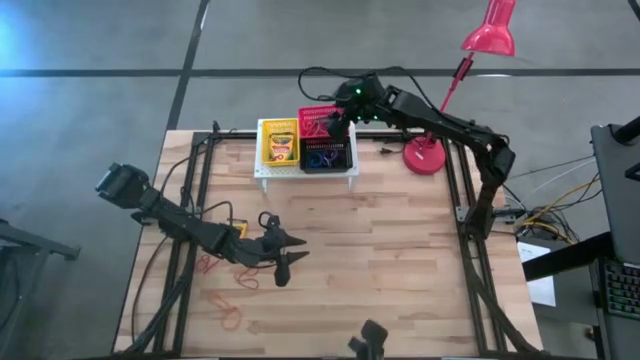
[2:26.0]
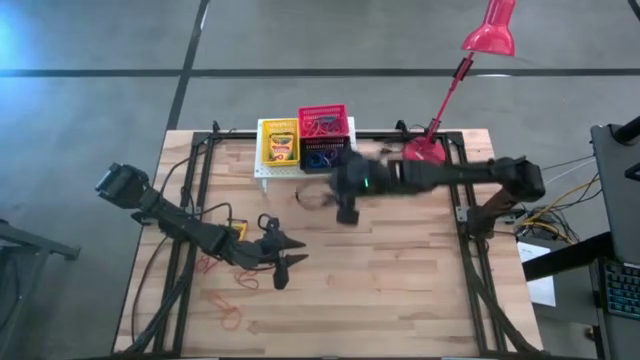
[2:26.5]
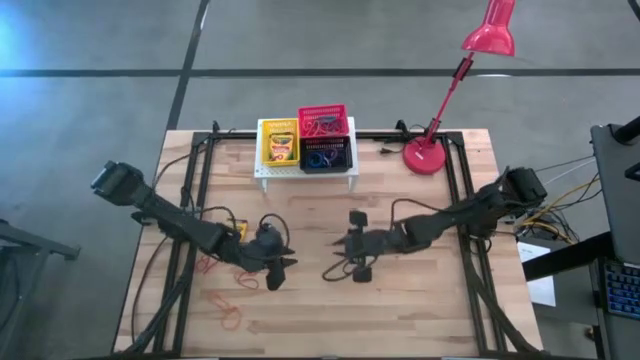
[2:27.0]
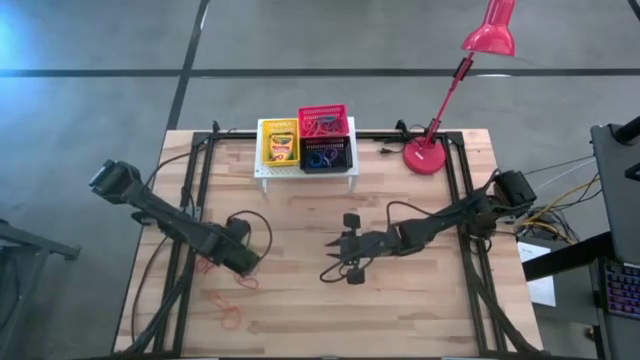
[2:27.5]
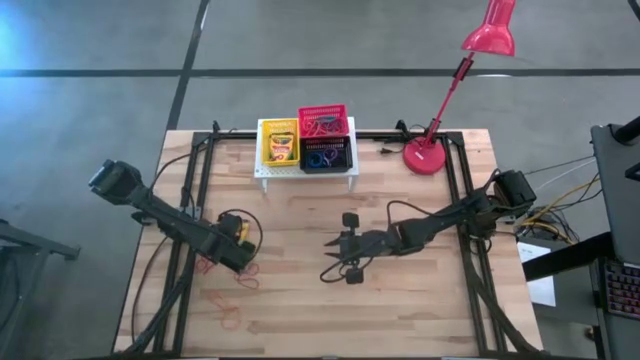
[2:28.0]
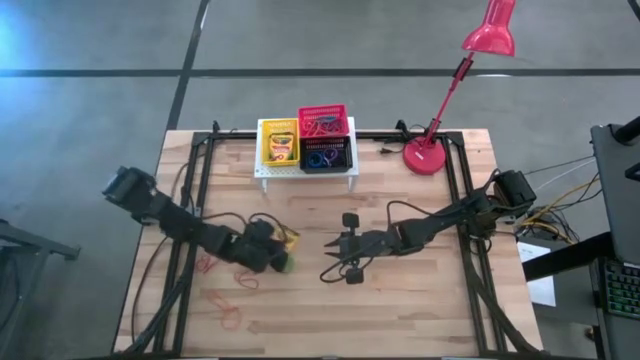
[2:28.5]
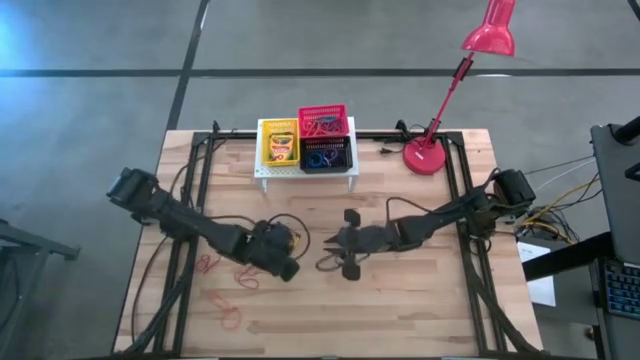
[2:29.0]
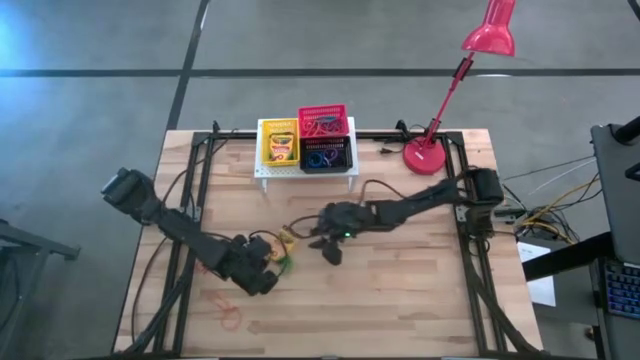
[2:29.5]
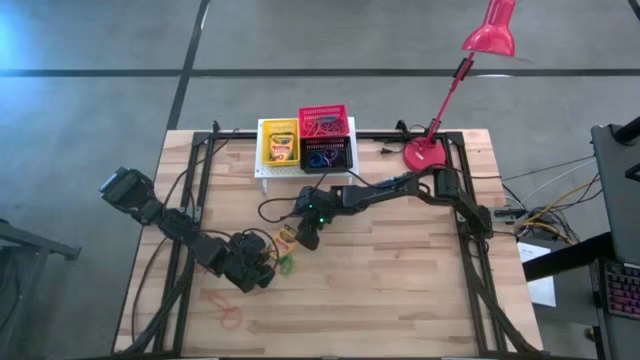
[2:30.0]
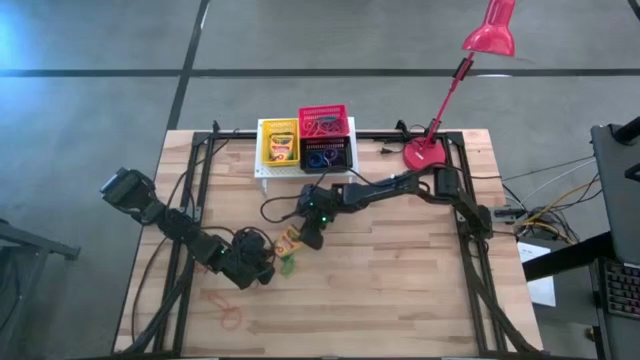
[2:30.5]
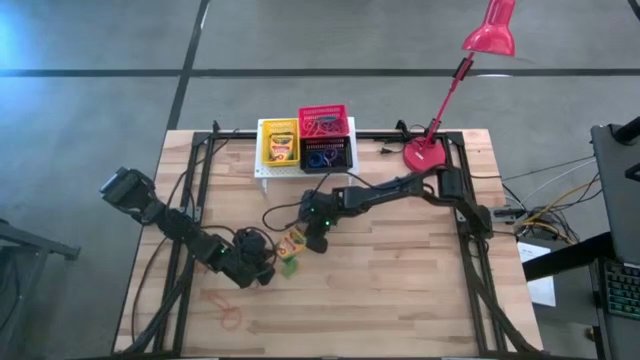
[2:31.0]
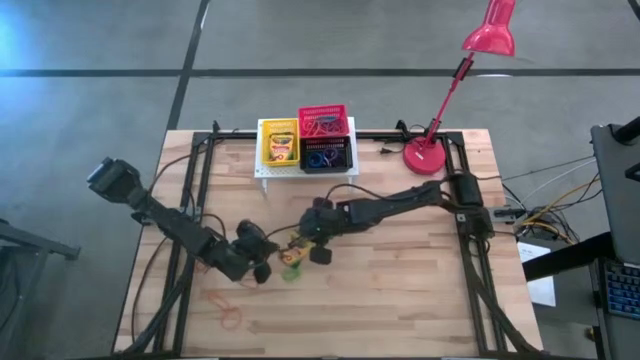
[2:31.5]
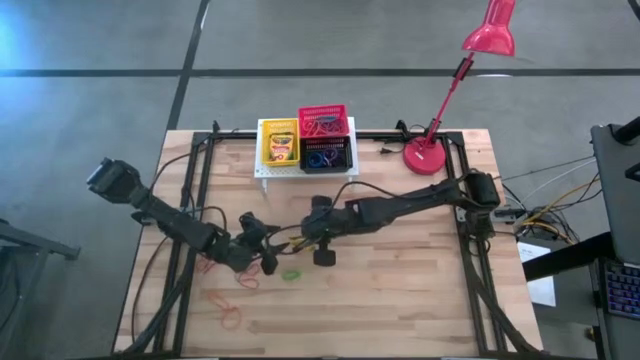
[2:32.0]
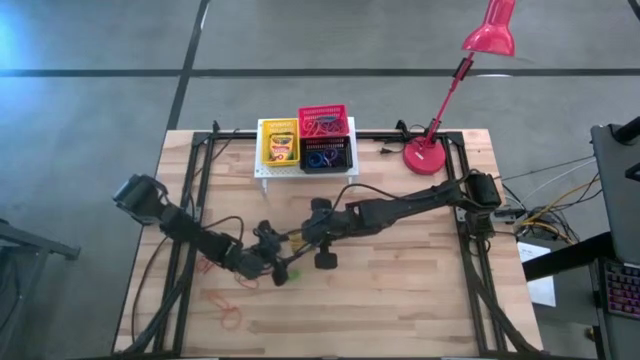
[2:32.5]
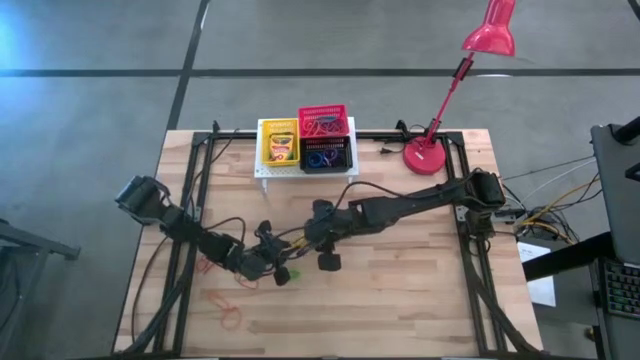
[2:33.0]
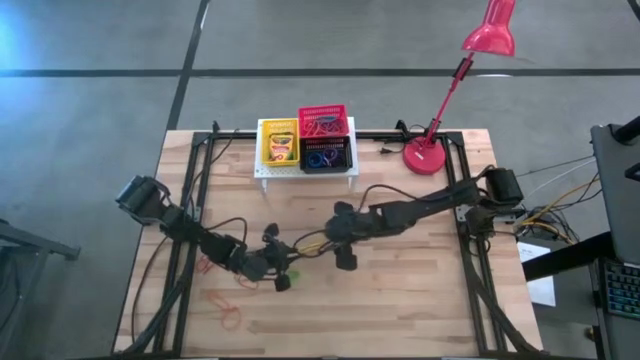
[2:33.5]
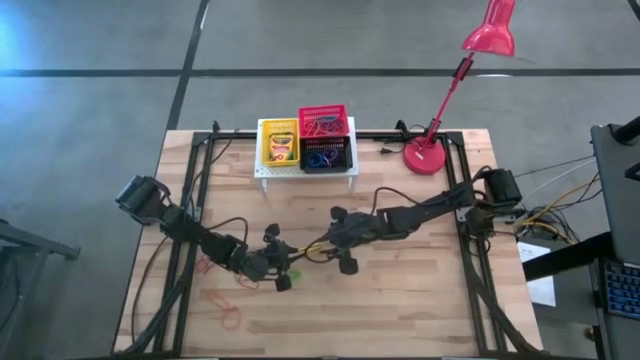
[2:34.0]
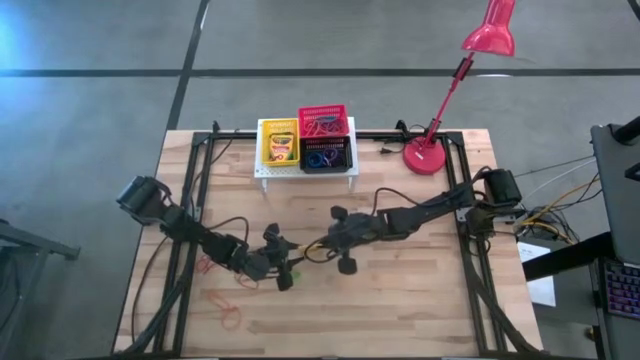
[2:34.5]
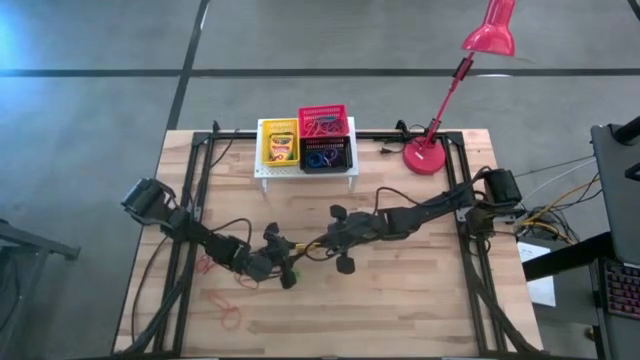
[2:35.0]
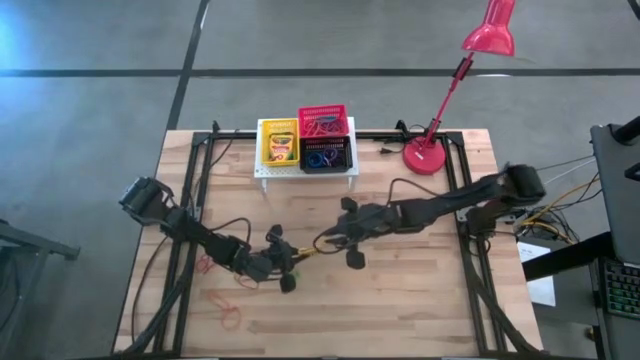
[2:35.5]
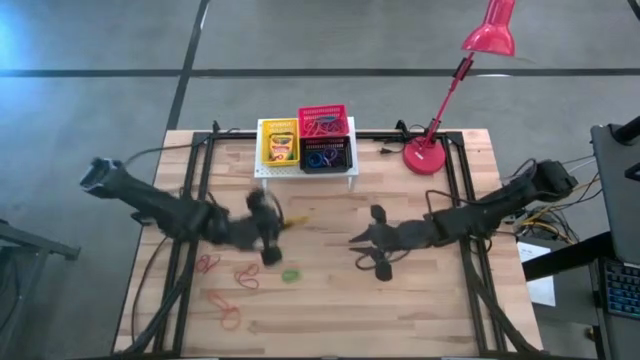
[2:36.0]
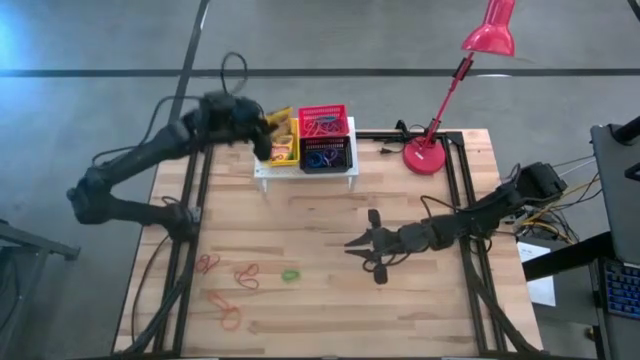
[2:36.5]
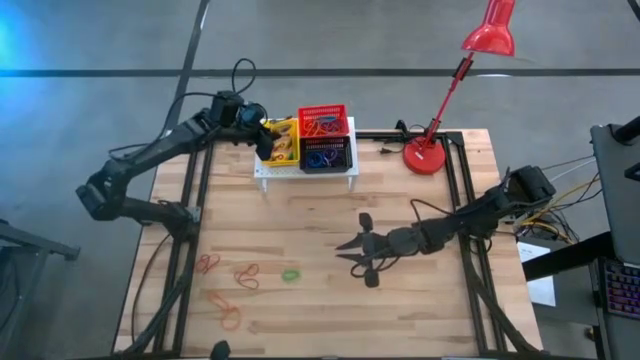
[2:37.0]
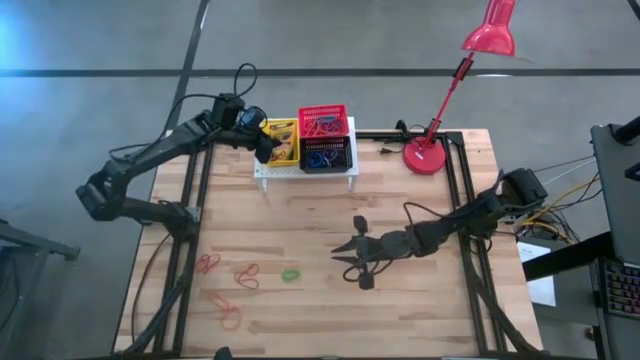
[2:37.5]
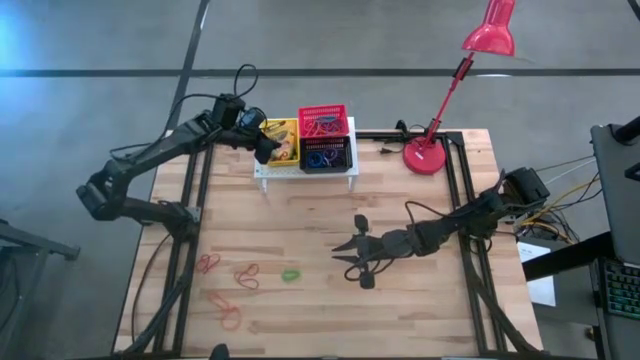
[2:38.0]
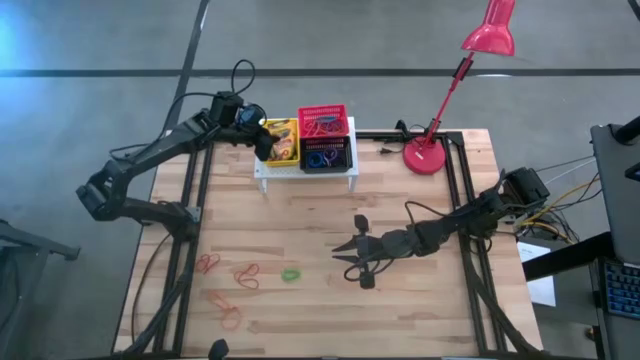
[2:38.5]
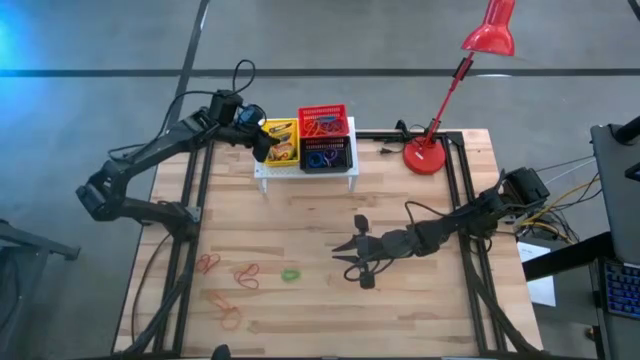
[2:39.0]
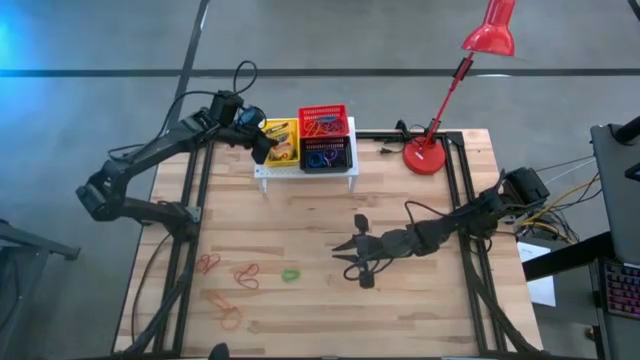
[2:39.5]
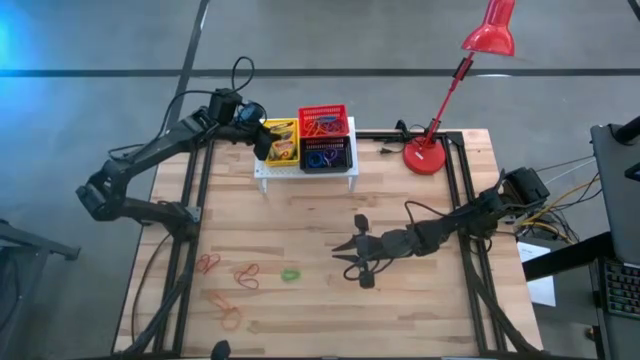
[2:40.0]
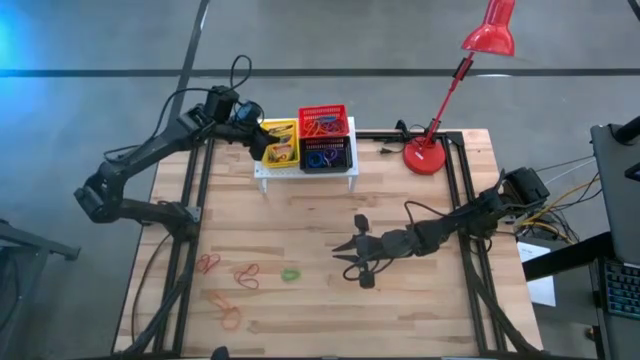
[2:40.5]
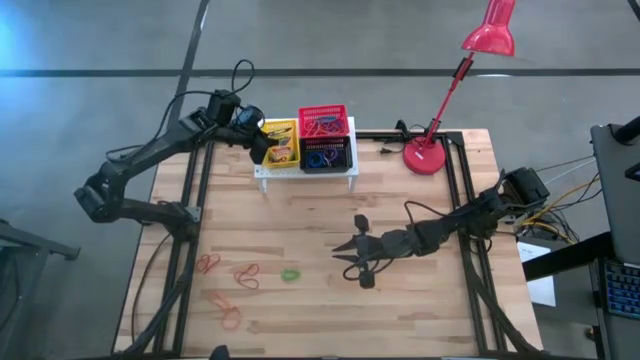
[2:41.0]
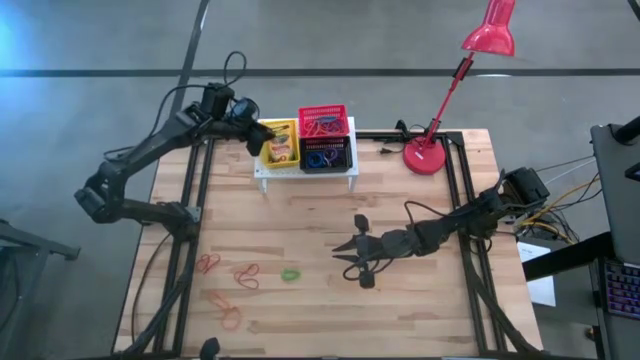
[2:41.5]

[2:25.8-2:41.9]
Task: Pick & Place Office Desk Supplies
Put the crayon box into the yellow bin

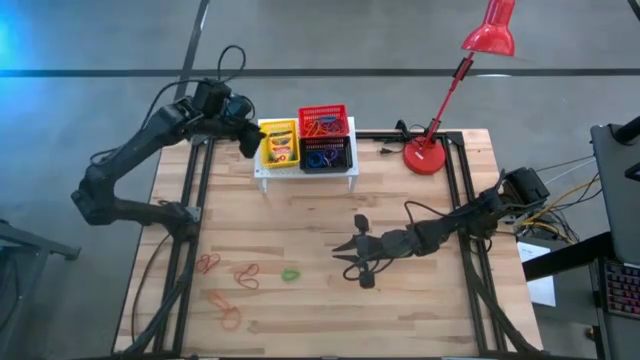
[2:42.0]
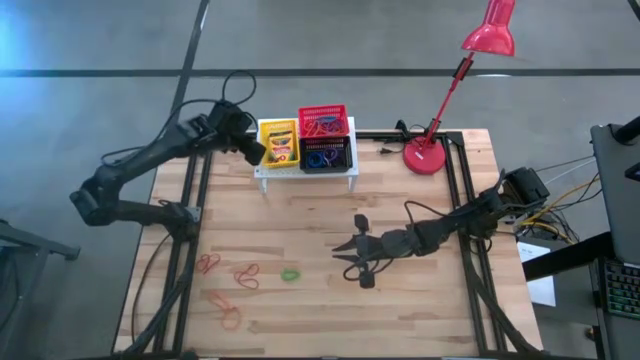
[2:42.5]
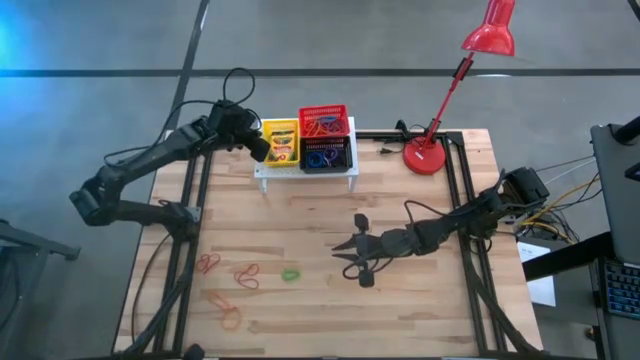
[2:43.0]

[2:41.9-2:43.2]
Adjust the yellow bin

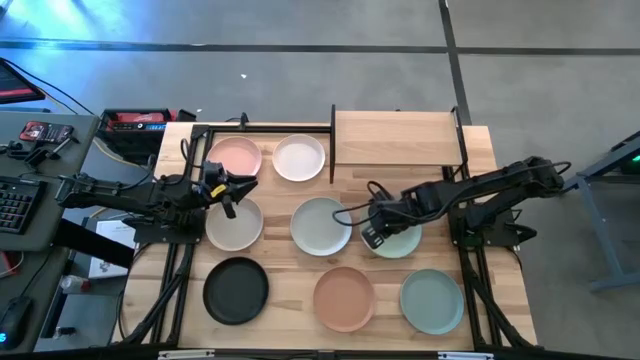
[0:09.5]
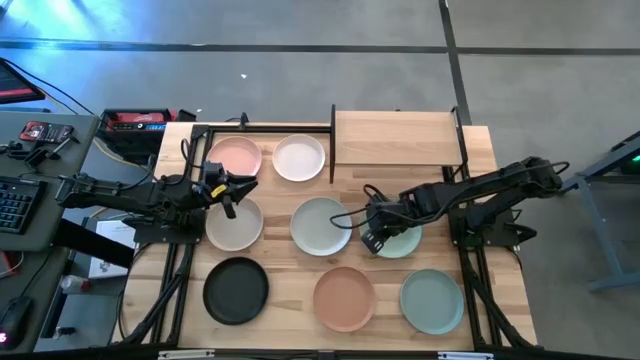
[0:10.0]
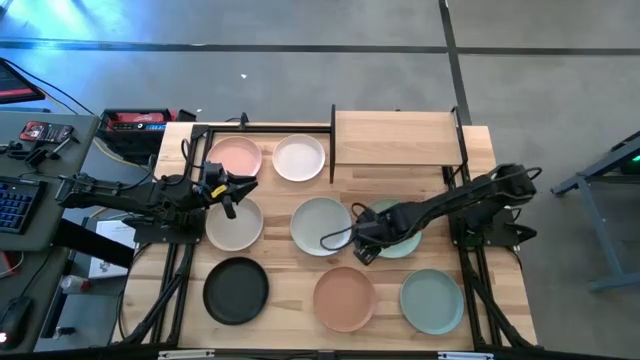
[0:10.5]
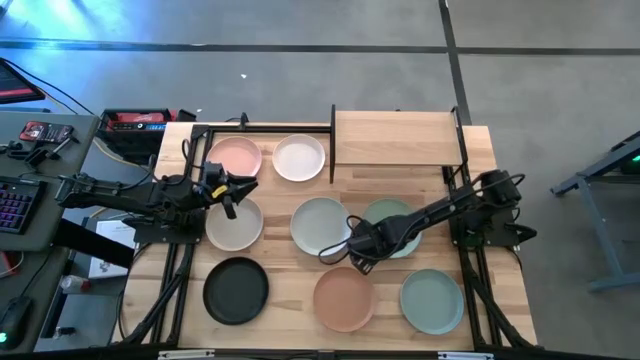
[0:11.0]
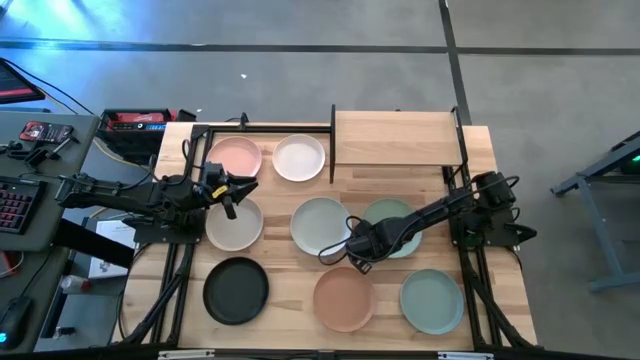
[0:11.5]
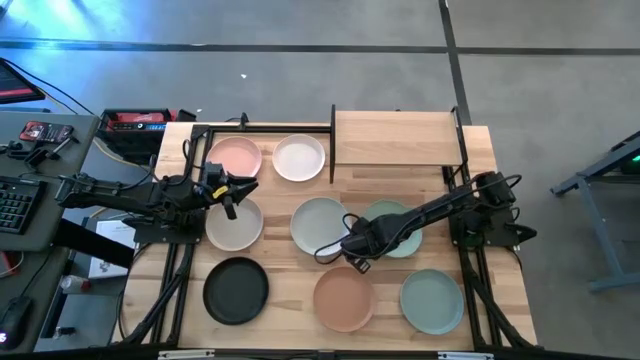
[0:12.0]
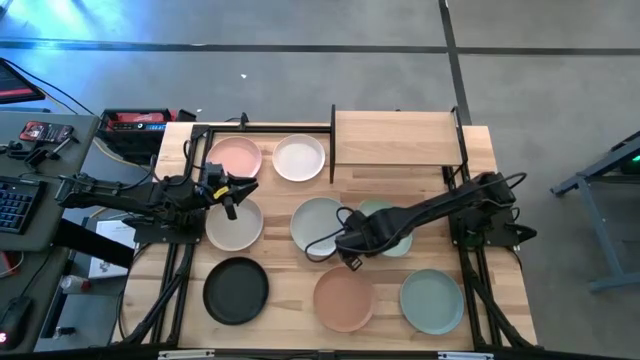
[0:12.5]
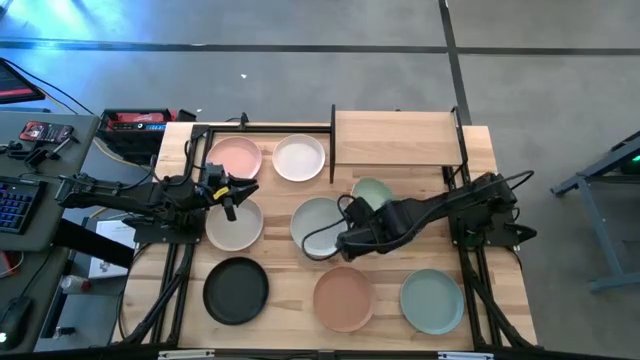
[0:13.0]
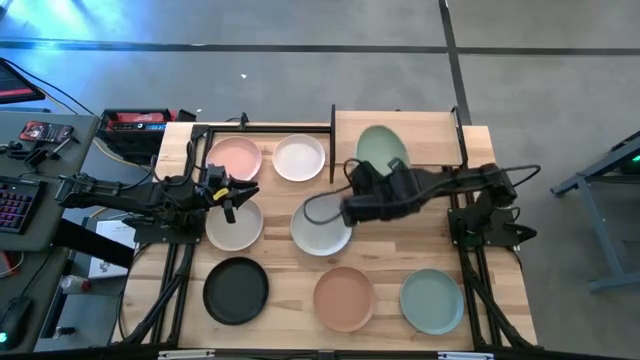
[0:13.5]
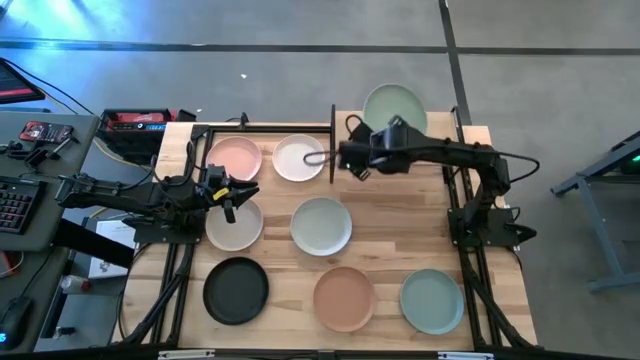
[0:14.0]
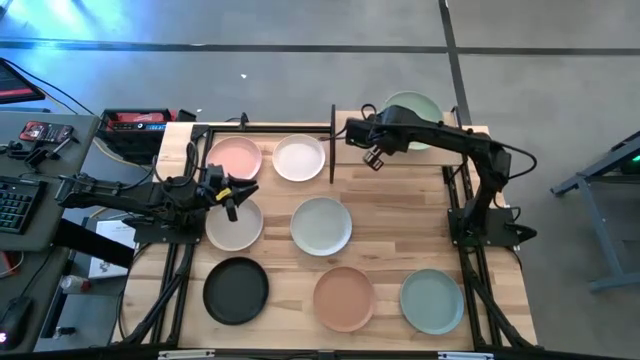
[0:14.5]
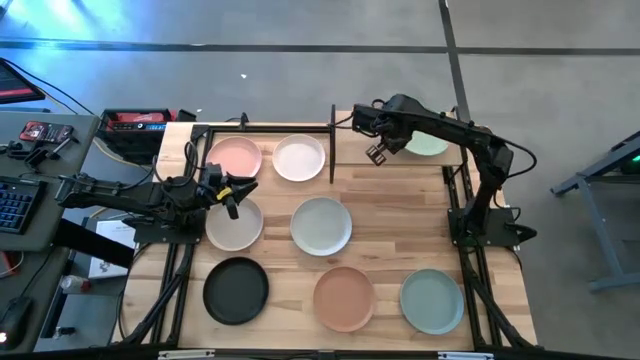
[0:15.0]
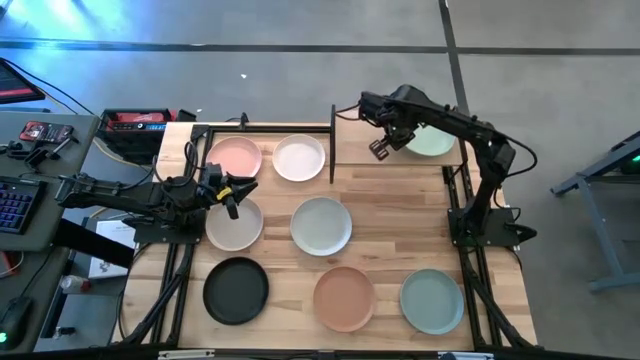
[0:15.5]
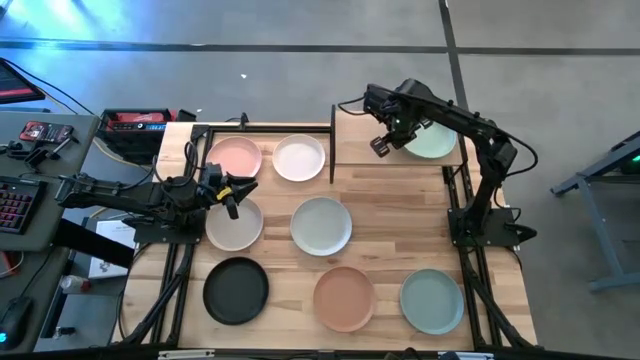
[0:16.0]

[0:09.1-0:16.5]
Task: Place and stack plates onto a shelf
Put the green plate on the shelf
